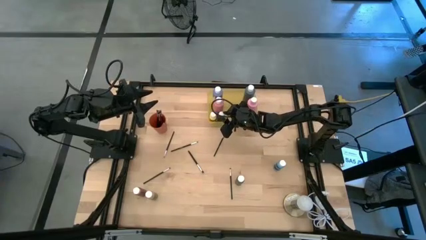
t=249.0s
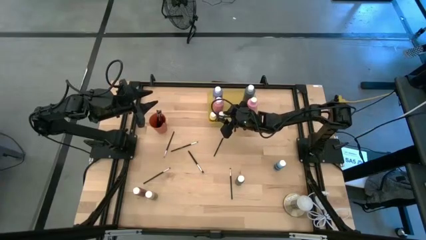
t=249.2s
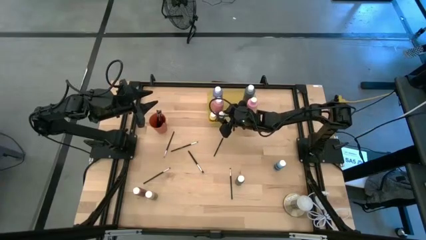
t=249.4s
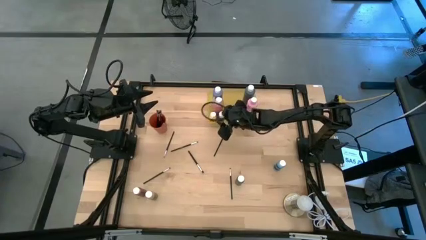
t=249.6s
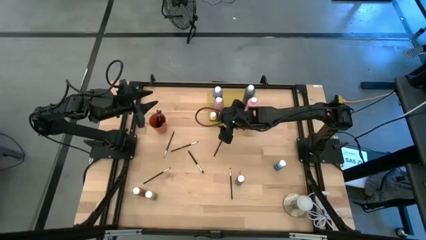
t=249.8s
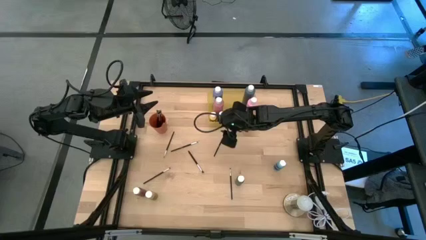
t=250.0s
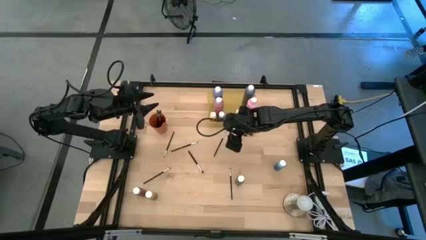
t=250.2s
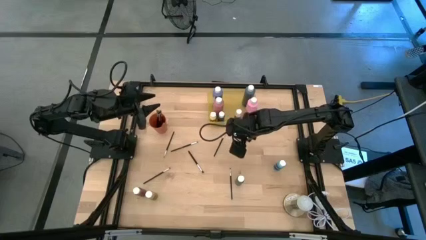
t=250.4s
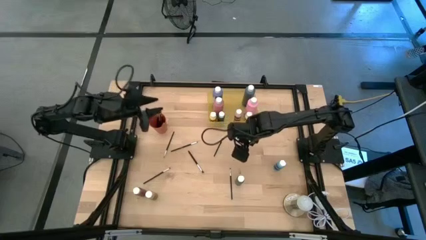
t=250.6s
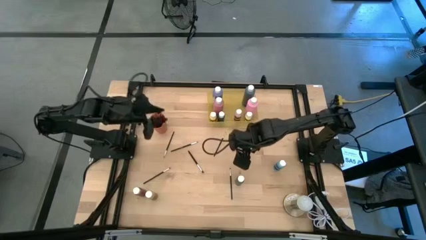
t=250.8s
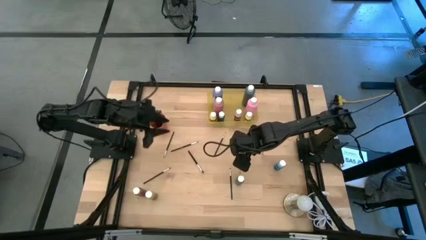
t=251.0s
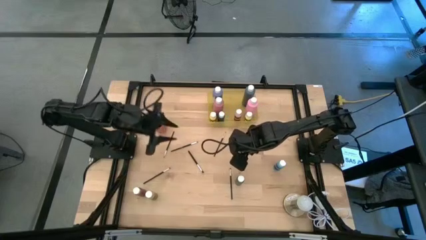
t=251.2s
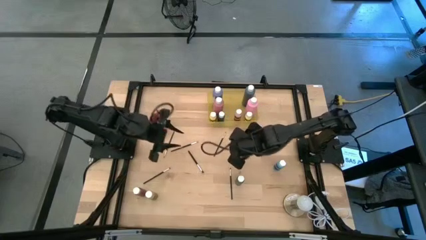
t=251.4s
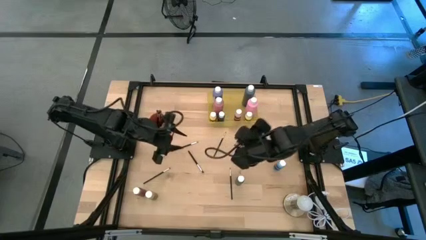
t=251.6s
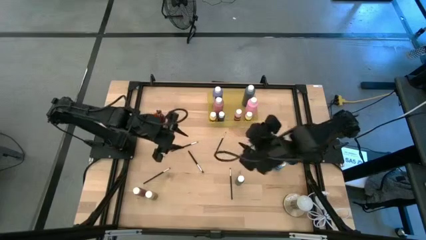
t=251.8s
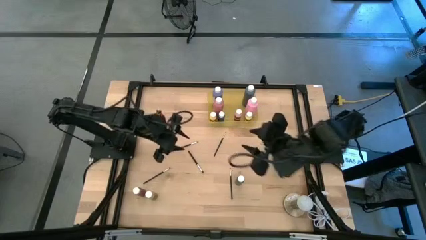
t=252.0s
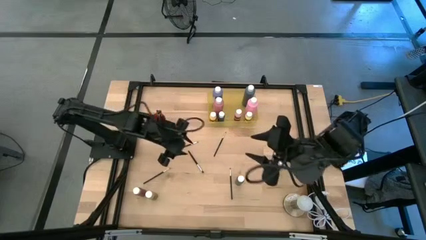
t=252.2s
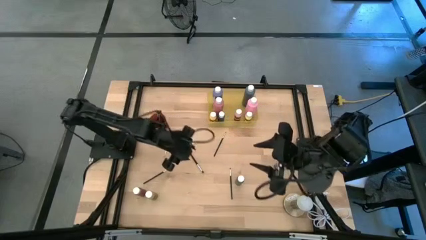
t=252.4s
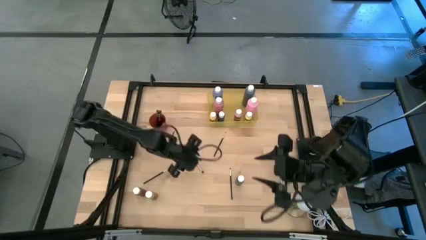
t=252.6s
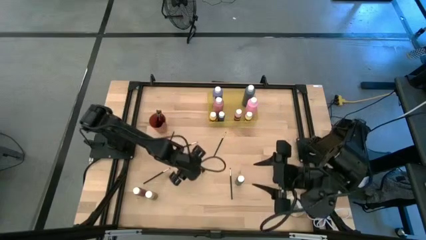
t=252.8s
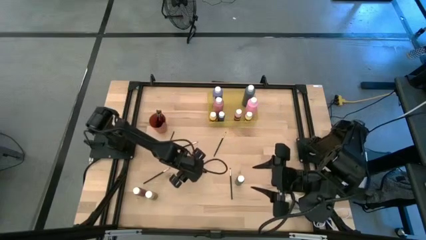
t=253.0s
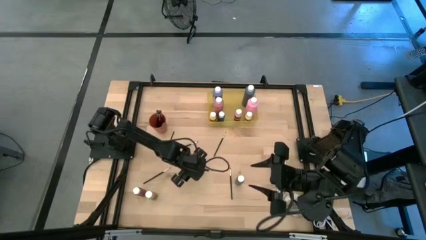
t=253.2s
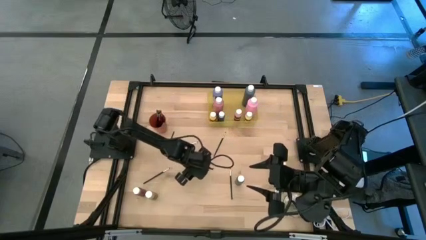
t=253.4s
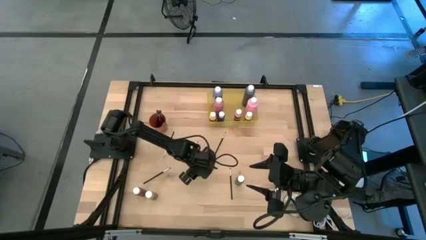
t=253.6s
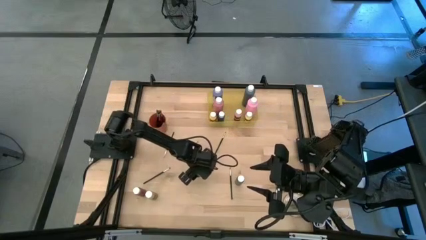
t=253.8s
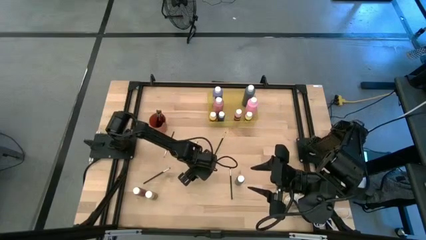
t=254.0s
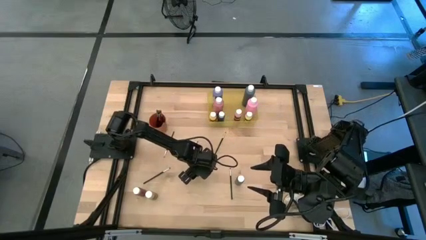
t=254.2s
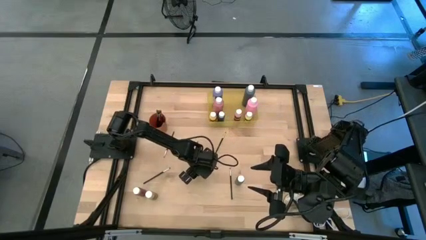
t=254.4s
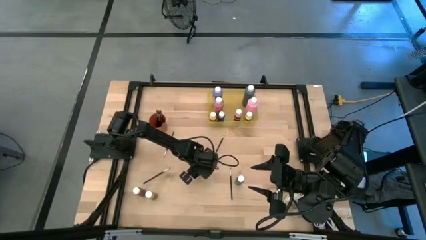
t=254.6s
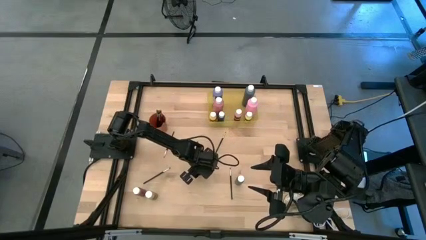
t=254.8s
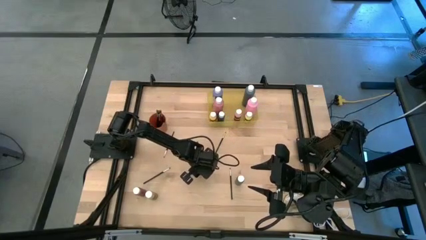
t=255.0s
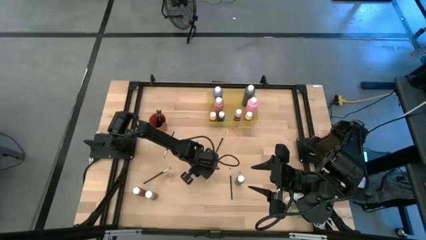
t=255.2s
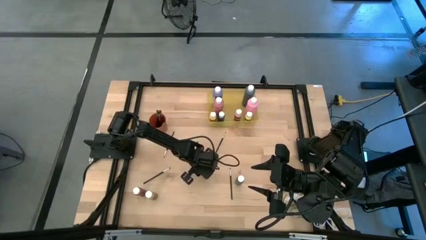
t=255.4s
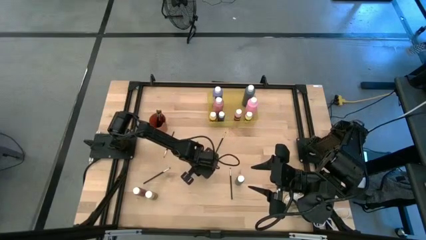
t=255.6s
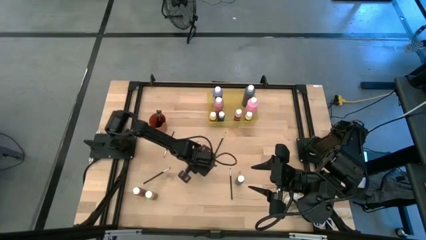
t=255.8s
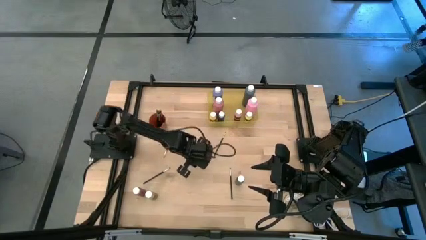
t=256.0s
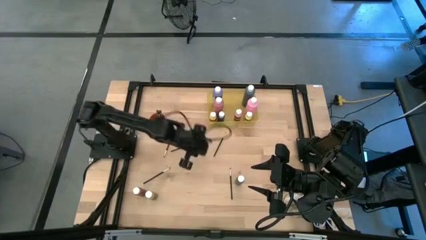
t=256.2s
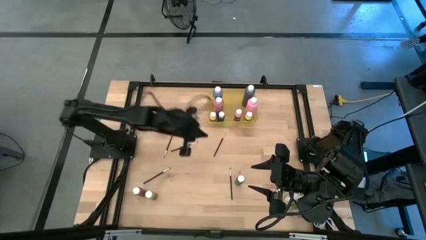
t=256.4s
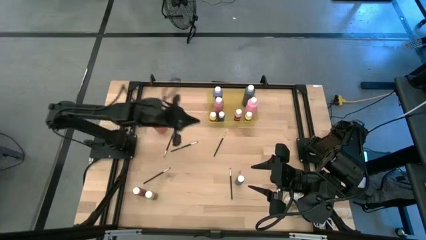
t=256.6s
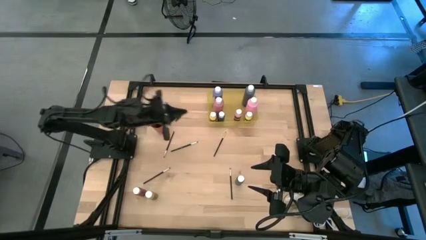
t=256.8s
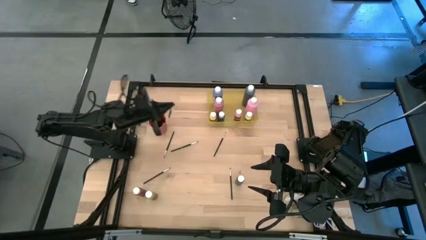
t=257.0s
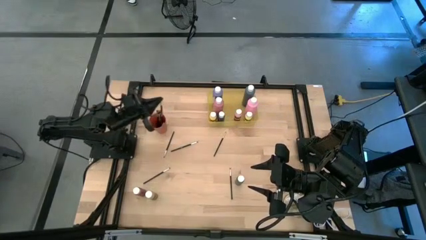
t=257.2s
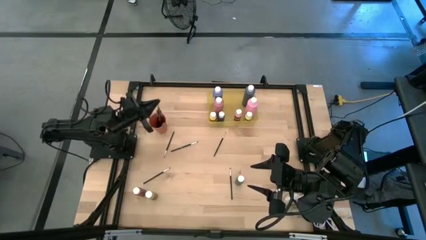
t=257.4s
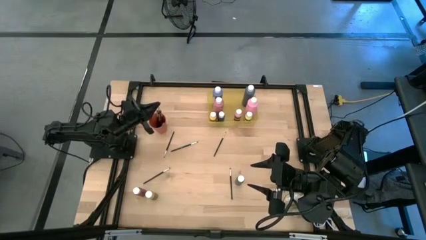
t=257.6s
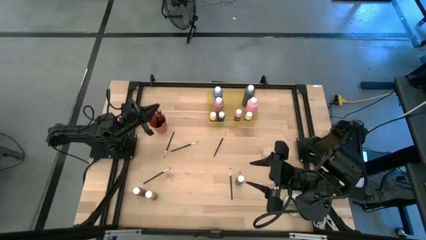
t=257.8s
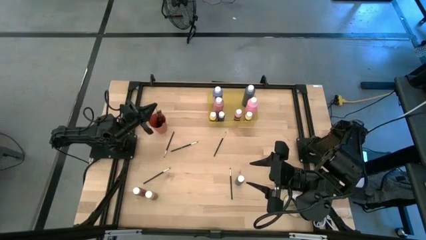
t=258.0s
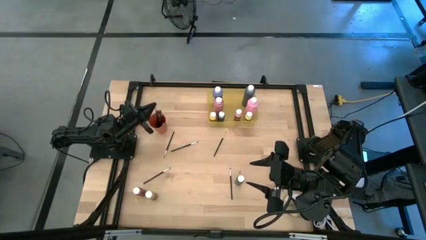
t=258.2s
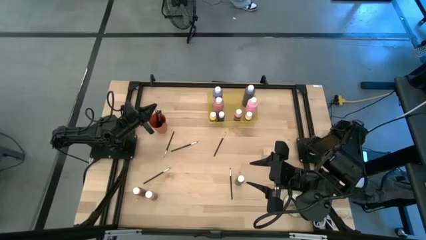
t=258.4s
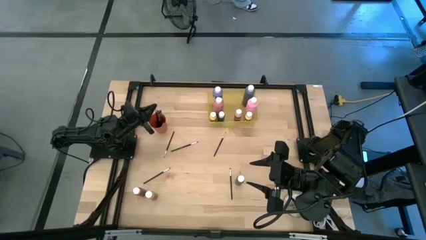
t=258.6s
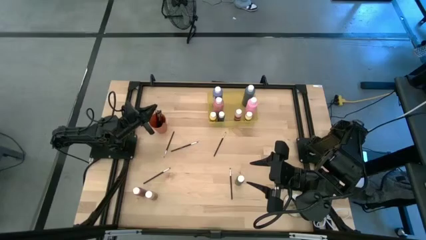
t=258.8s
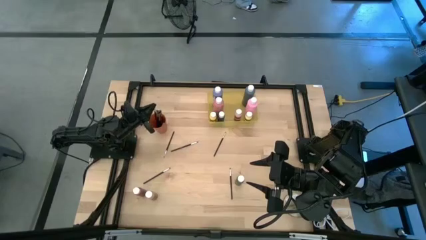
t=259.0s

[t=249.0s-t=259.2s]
Task: Pick & Place Paint Supplies
Put the silver paint brush into the orange cup

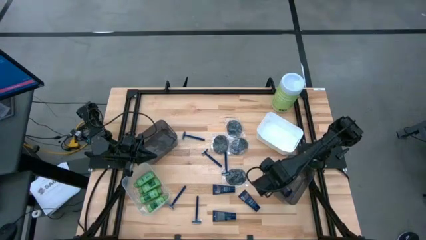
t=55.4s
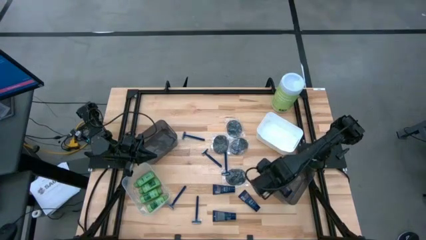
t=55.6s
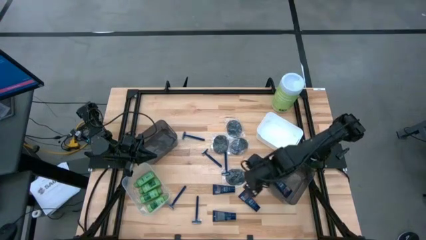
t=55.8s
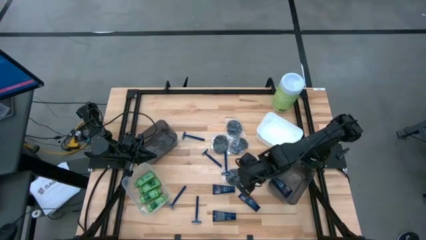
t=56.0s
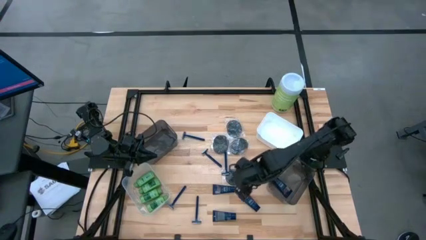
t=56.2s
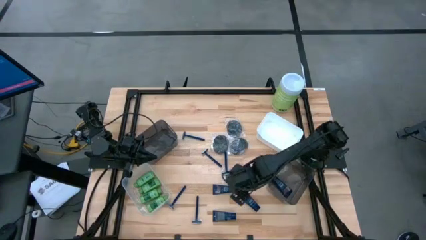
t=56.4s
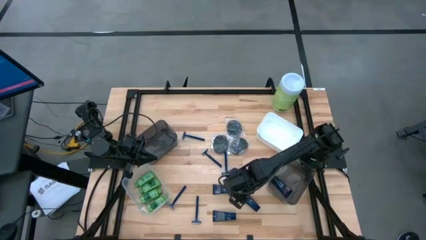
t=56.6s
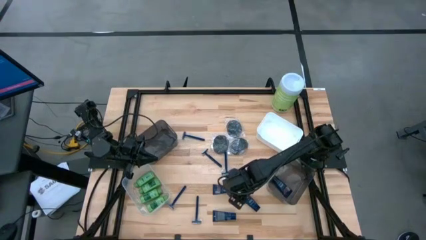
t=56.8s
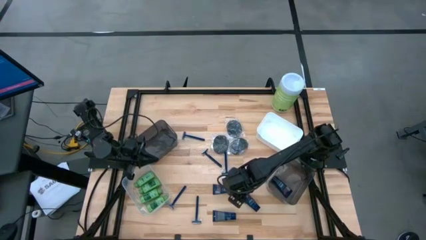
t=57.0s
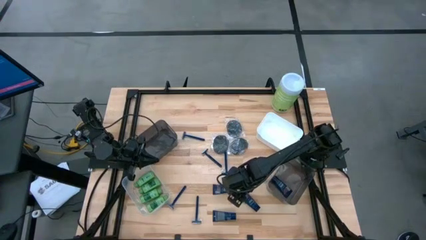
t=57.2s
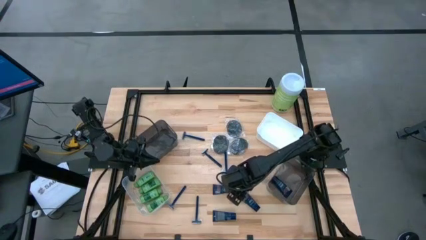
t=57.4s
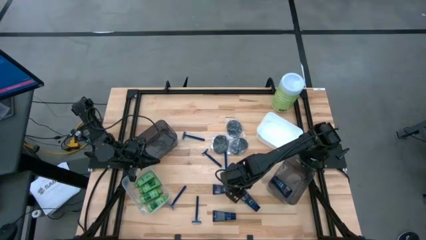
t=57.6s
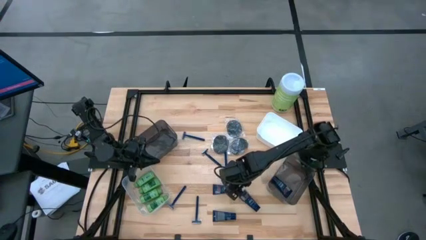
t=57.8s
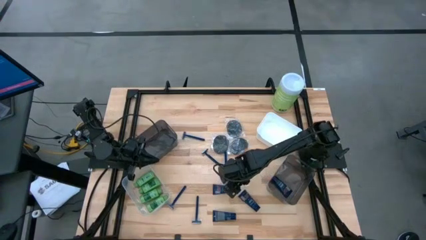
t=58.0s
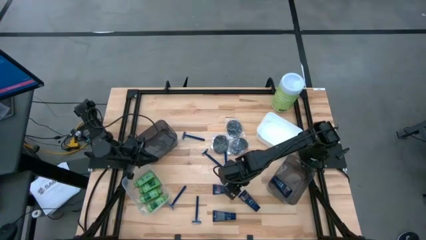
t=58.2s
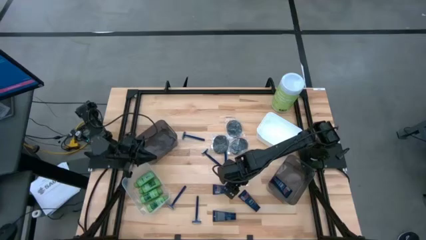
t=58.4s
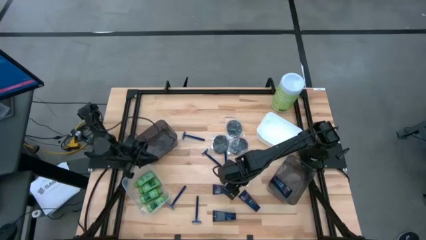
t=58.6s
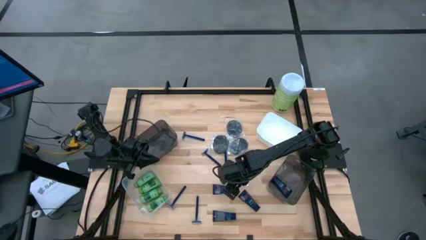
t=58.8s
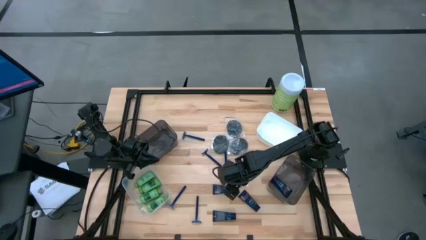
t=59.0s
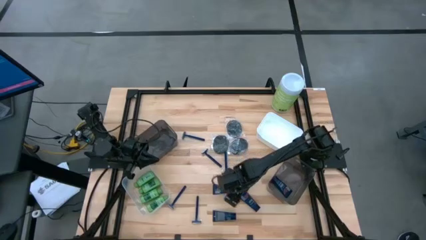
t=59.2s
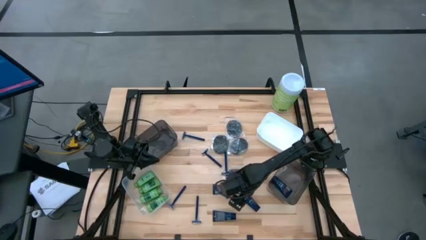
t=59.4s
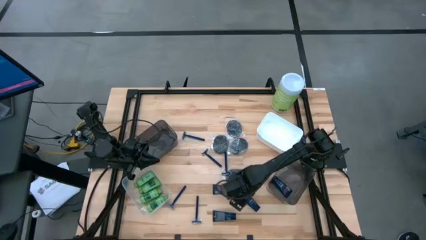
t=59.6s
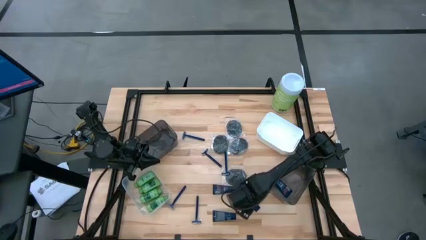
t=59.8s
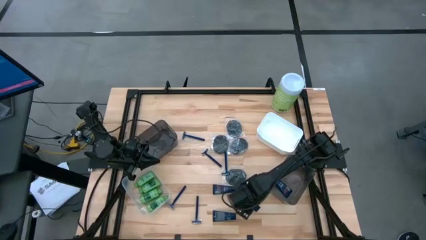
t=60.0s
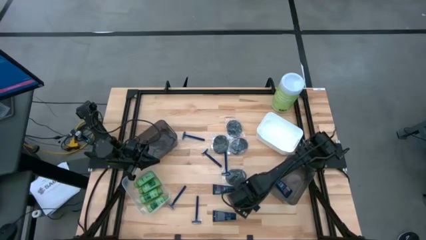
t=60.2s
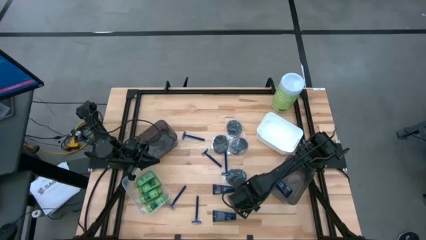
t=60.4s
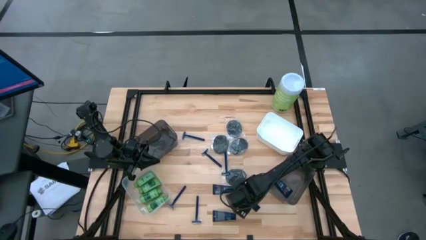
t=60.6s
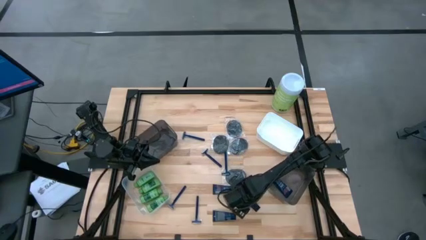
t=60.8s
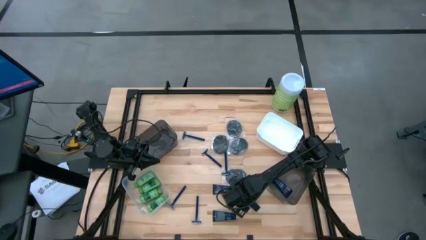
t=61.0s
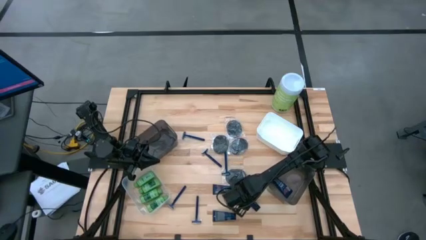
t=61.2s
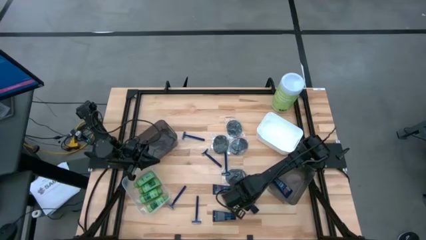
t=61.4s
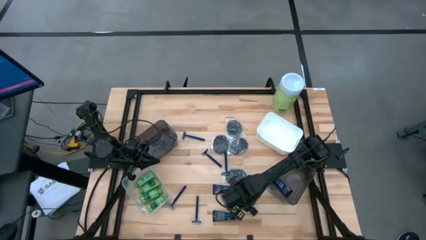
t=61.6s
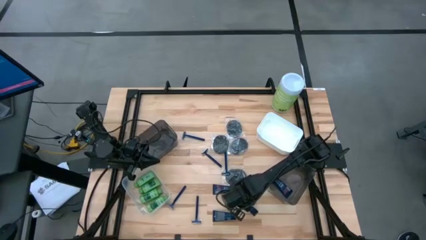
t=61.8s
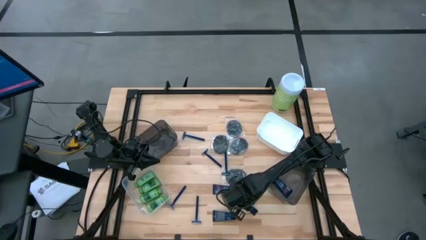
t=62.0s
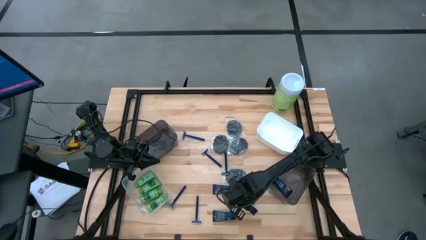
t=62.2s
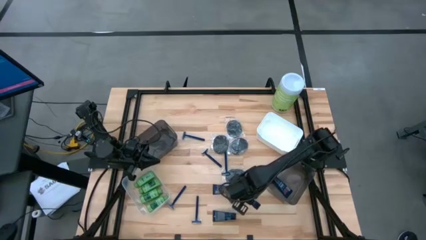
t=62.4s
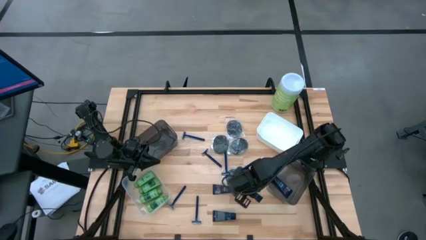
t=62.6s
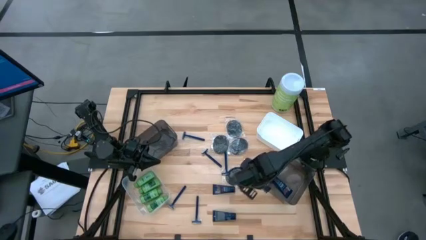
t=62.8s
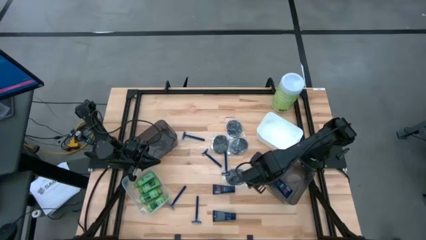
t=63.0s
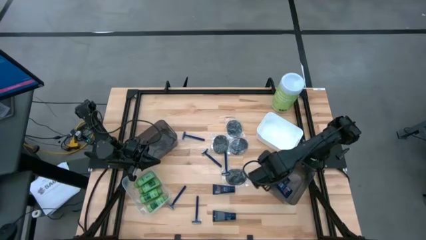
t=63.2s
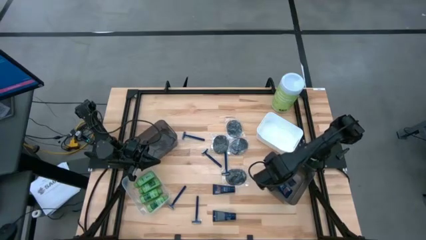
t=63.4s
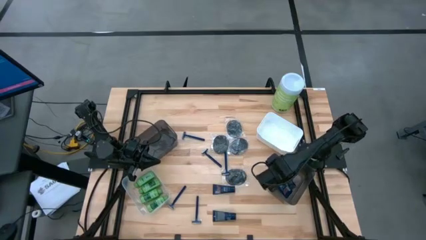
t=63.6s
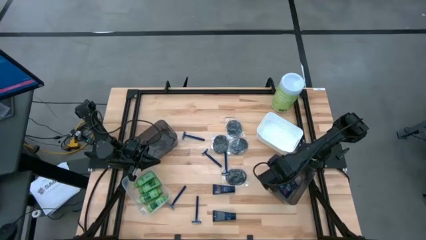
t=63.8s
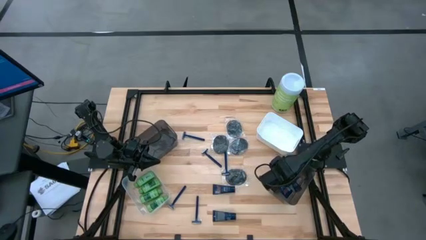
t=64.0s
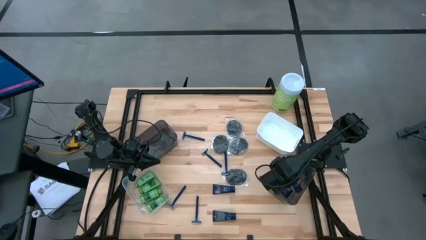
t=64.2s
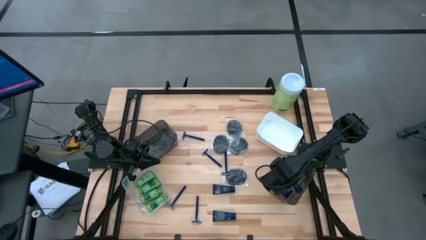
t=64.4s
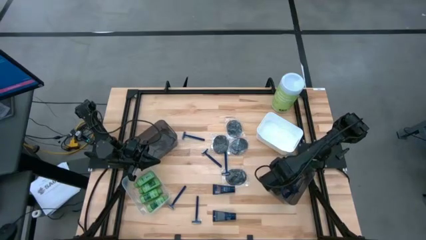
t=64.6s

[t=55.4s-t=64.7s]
Task: Pick & Place Travel size toiletries
Put the blue shave cream into the right black bin
